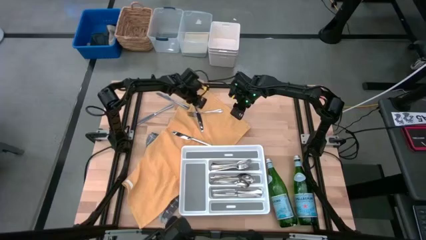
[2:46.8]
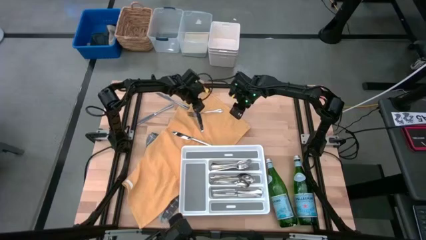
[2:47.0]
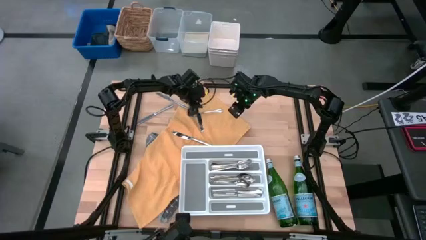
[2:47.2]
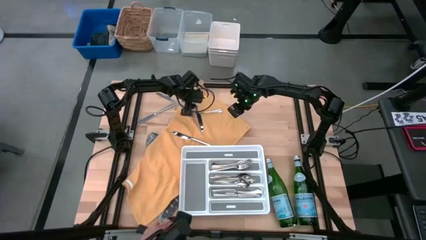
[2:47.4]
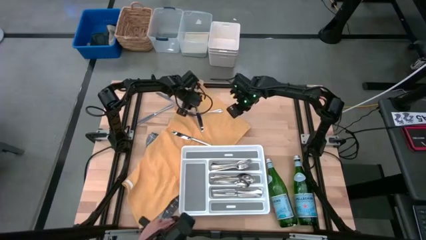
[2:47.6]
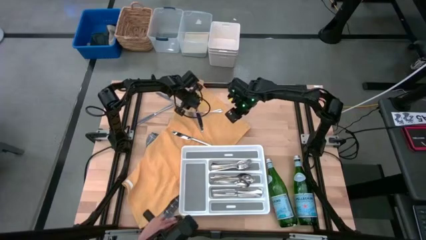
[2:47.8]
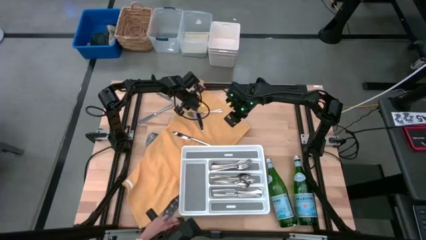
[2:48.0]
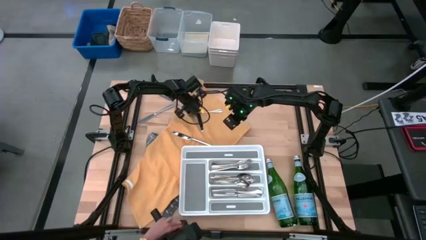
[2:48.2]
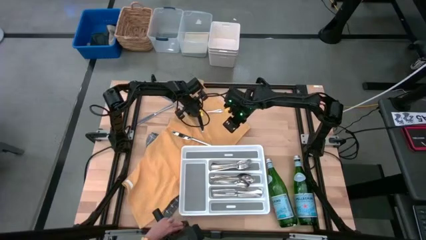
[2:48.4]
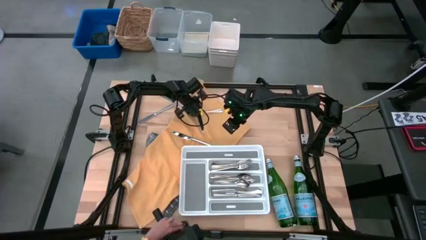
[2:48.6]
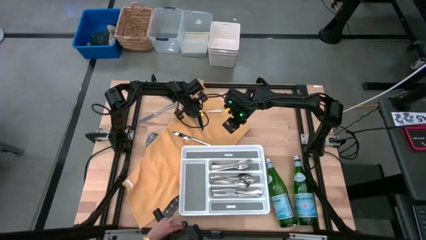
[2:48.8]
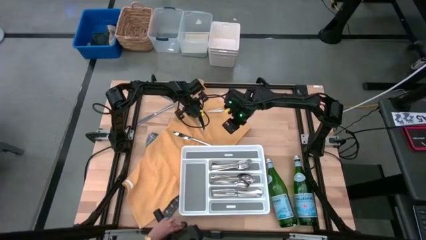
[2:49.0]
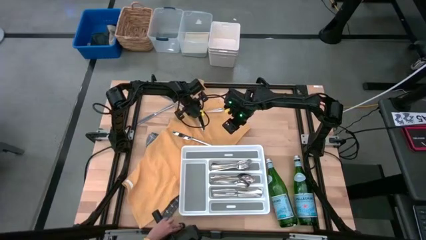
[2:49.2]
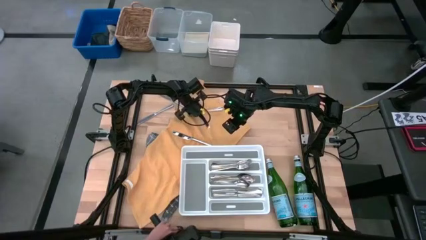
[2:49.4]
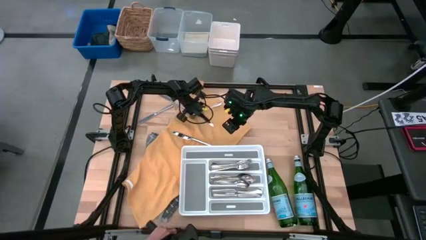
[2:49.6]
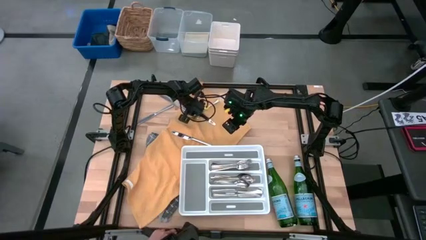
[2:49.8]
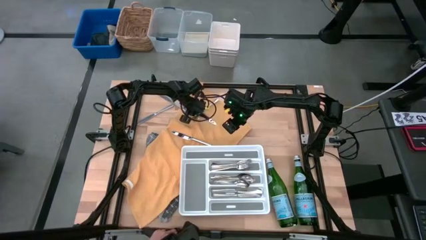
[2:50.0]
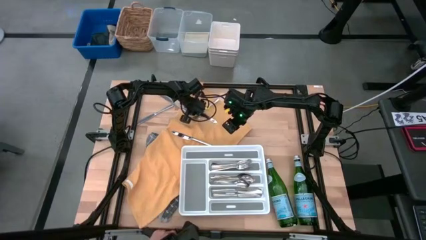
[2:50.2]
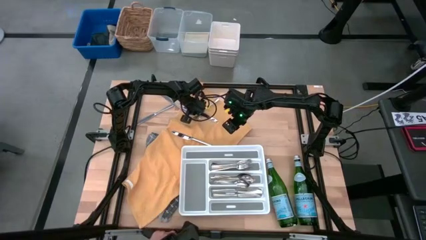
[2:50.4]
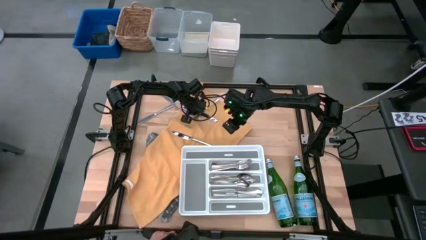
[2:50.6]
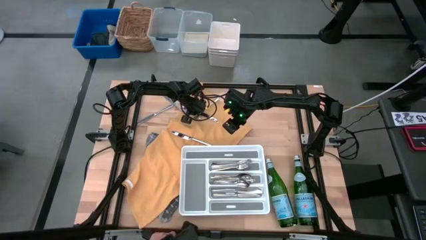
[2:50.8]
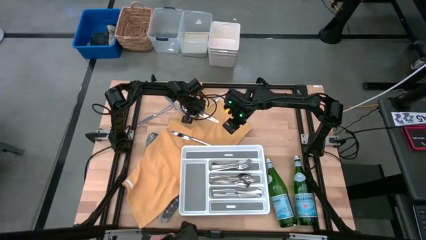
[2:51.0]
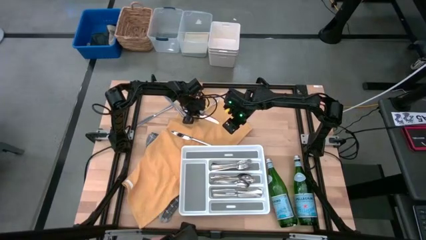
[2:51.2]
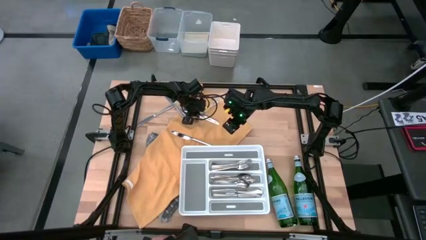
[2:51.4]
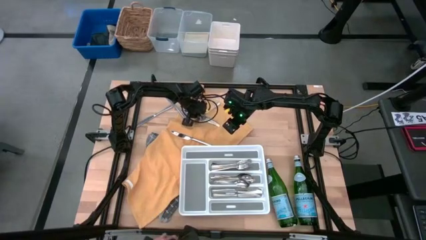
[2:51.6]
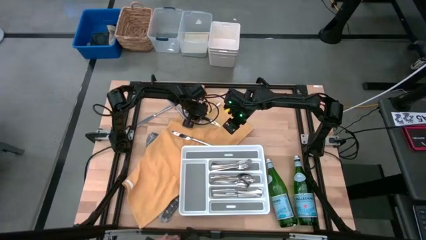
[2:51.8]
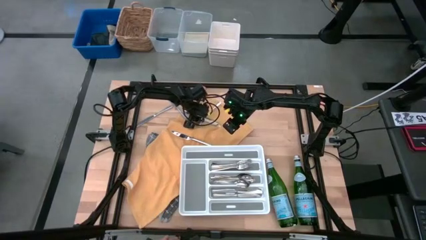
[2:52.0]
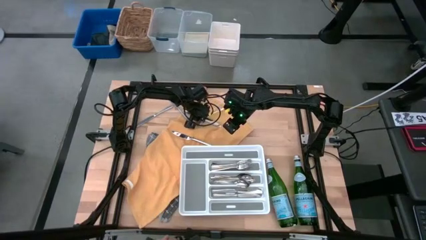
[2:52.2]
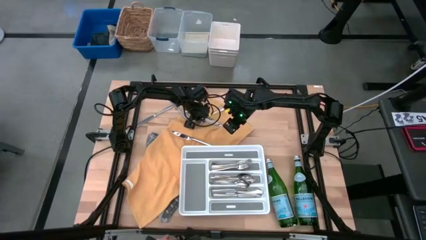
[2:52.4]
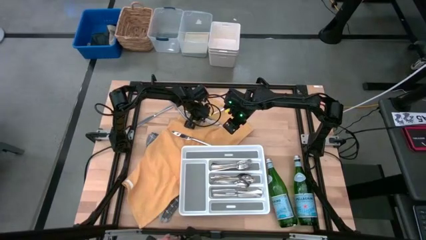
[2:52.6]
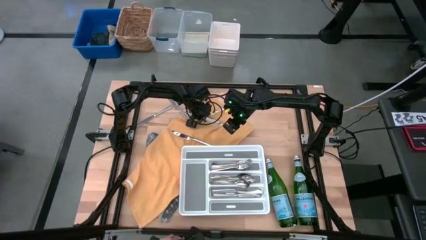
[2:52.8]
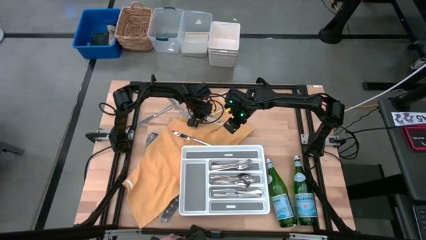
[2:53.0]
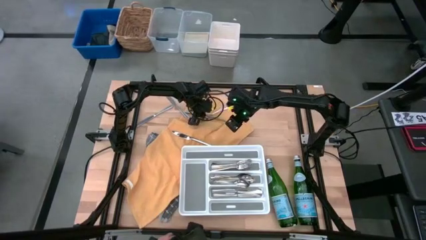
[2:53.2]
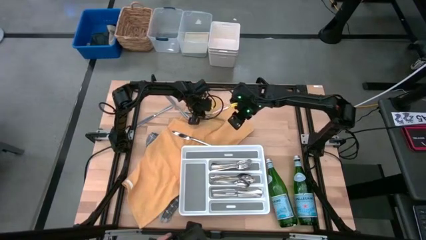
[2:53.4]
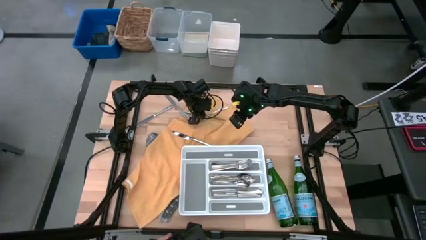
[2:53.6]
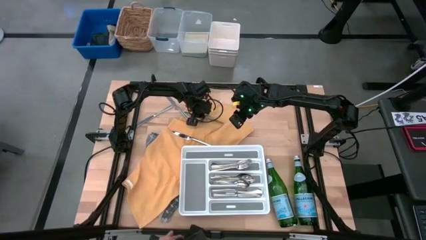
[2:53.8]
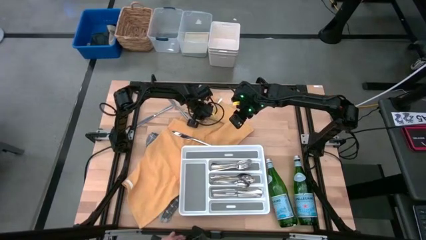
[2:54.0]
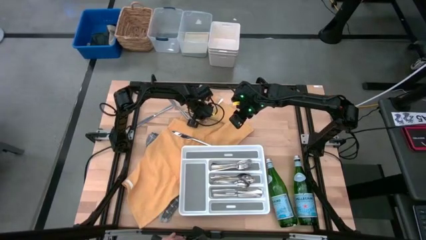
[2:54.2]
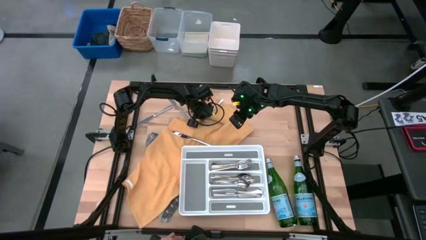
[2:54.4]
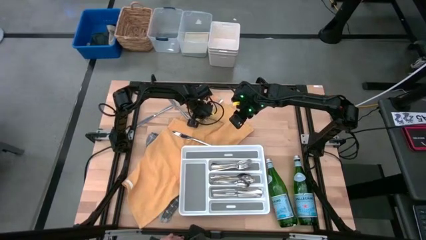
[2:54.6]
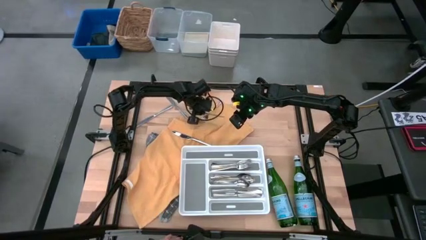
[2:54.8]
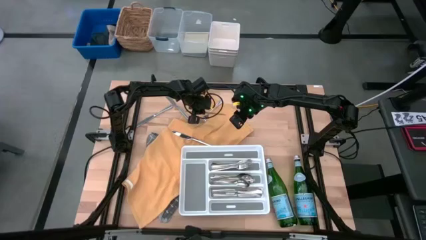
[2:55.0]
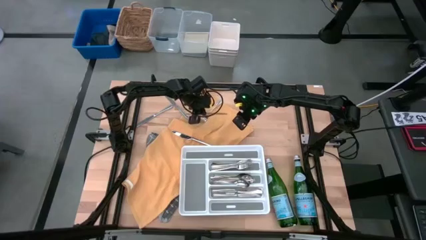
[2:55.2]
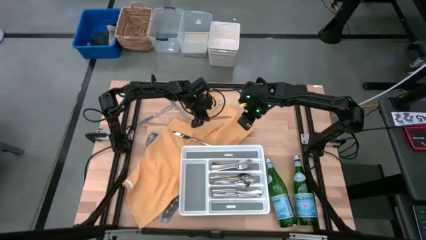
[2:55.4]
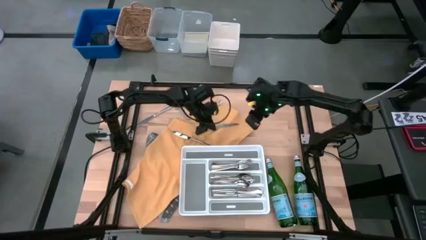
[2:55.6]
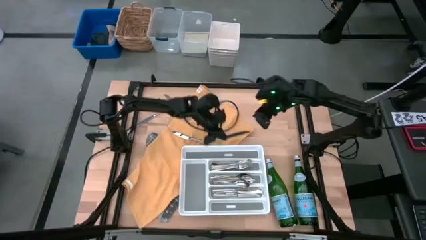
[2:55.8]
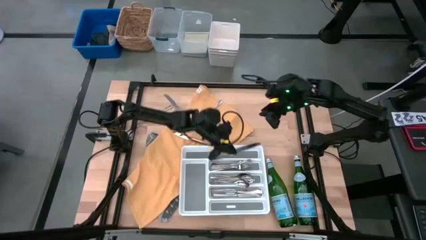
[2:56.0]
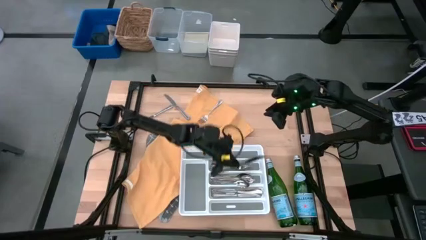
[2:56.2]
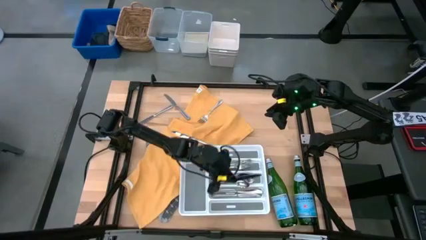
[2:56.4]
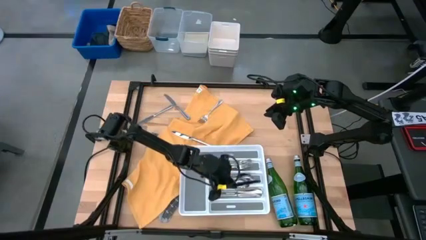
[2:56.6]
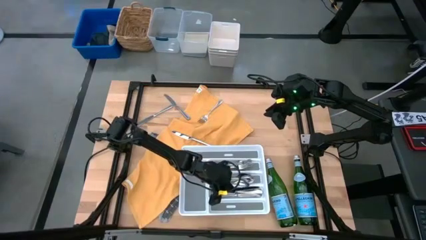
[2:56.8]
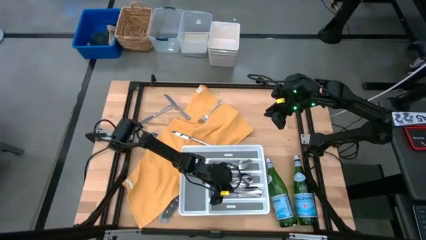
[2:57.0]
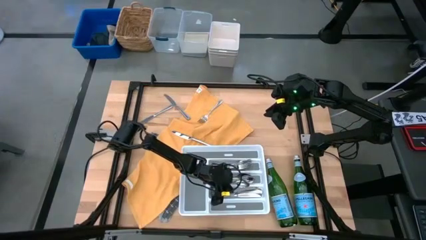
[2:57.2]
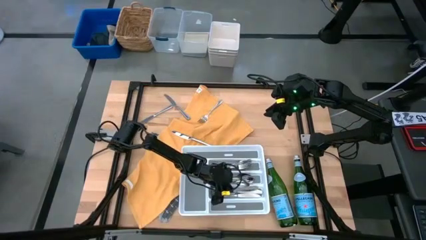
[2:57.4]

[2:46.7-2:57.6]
Task: Sort silverware
Put the silver table knife into the white silverware tray

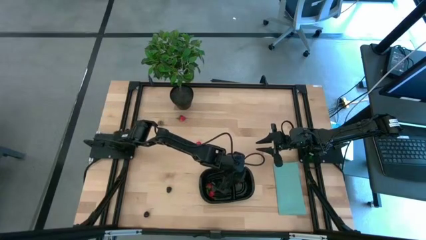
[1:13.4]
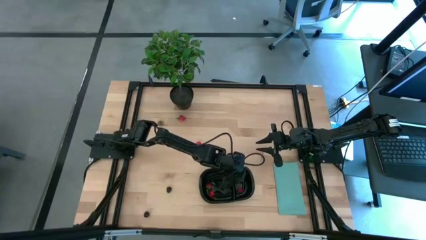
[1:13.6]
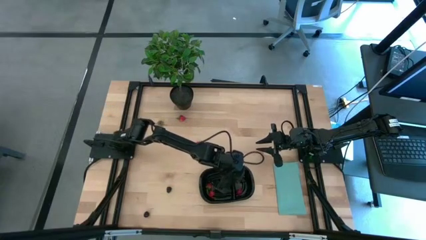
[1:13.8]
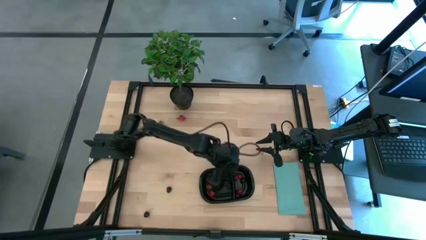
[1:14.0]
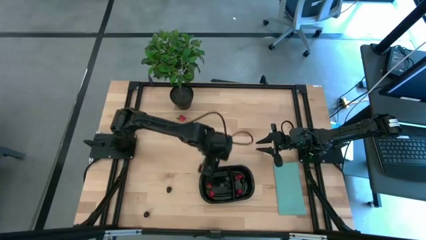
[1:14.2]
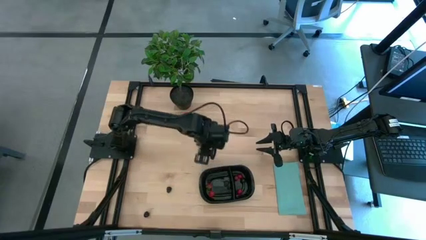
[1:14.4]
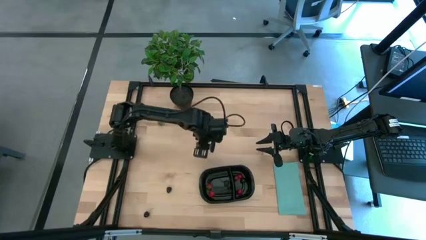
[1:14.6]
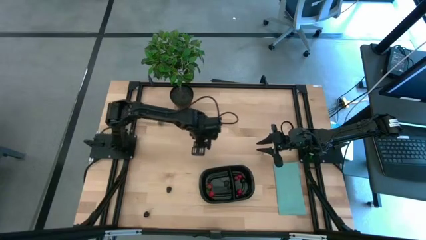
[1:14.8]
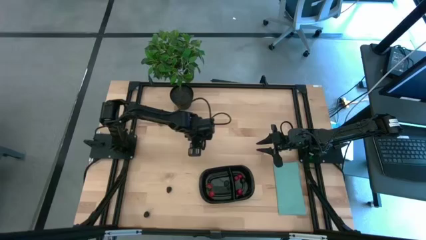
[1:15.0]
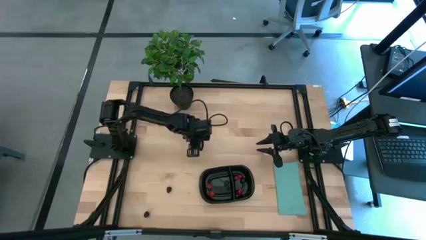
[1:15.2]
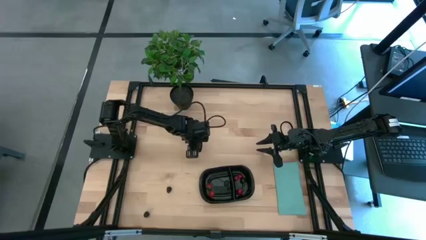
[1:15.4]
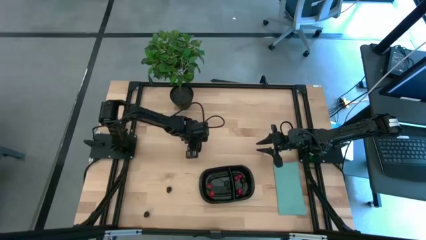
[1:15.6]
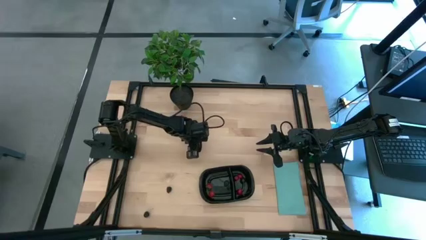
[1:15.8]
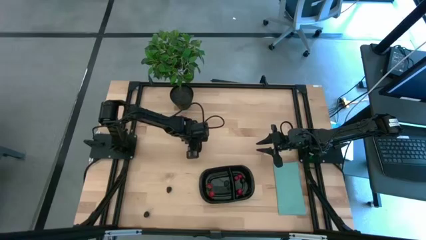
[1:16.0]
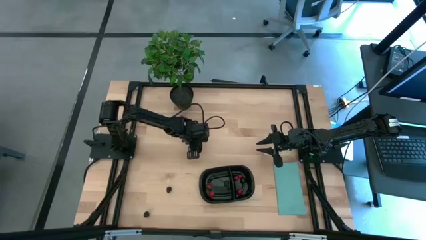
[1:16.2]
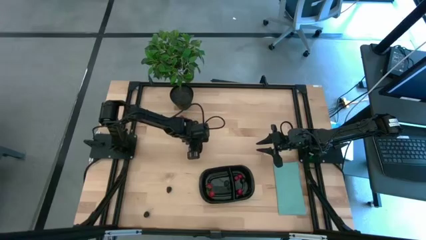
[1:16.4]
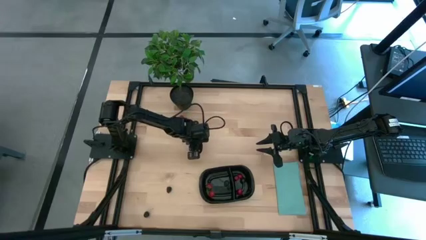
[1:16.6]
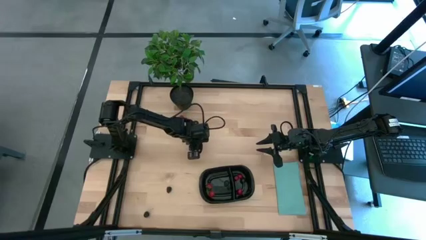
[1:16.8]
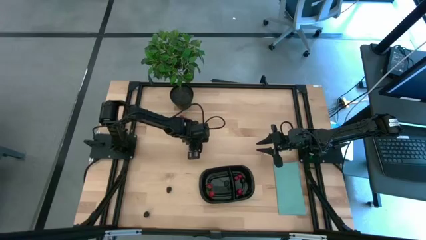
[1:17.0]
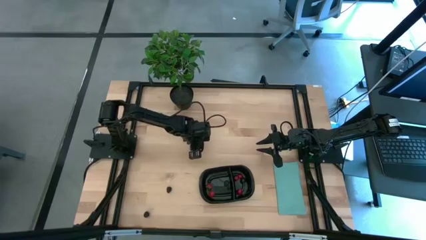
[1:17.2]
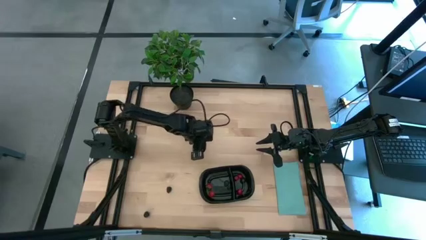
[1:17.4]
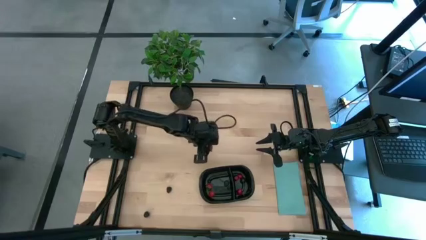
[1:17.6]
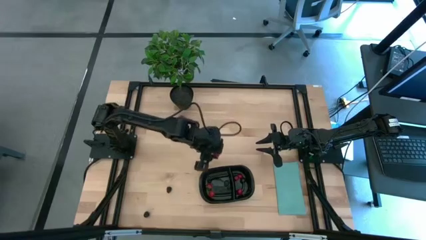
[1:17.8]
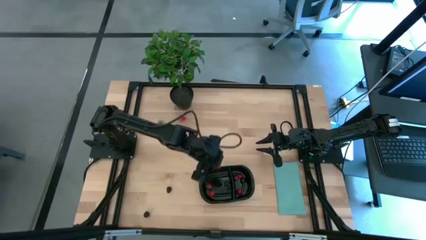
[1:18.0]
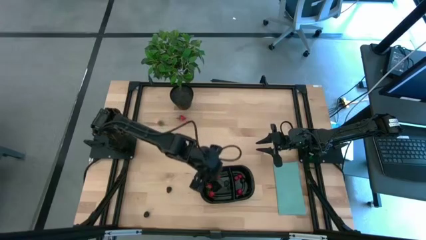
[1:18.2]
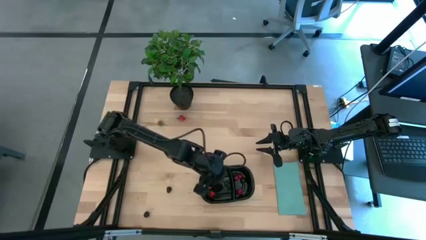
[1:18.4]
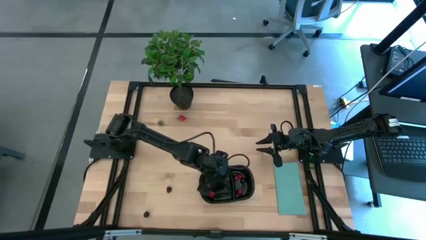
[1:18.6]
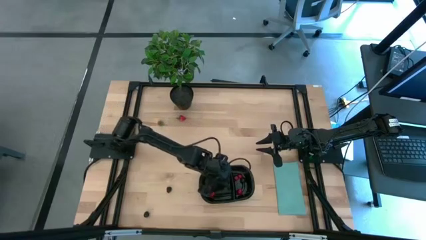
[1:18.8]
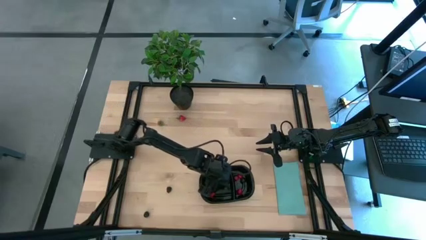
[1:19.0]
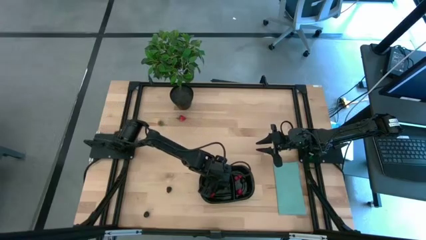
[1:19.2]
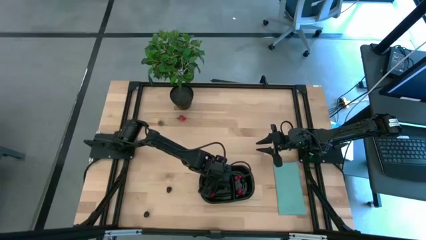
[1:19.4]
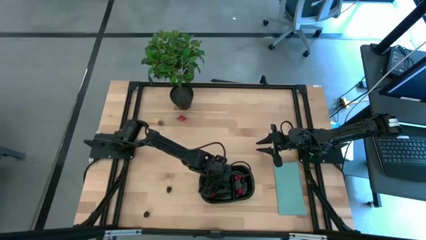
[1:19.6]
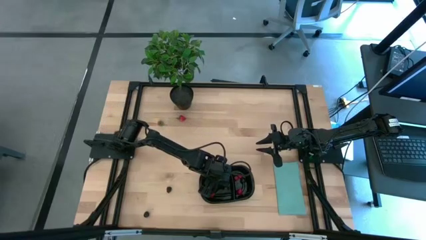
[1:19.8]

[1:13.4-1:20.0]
Task: Pick and placing Produce into tupperware
Put the raspberry into the left side of the black container
